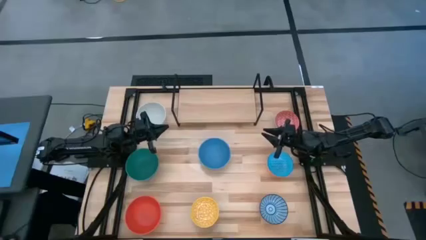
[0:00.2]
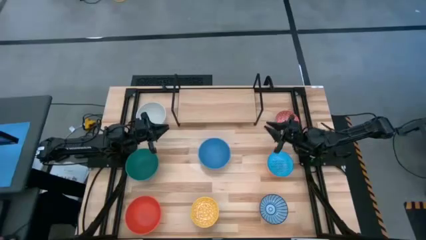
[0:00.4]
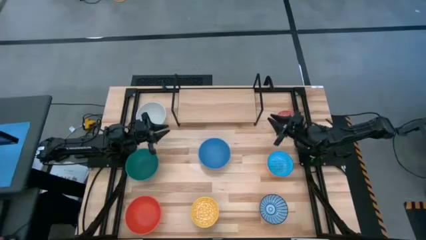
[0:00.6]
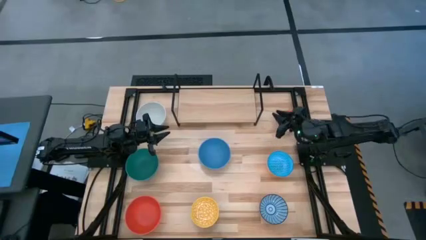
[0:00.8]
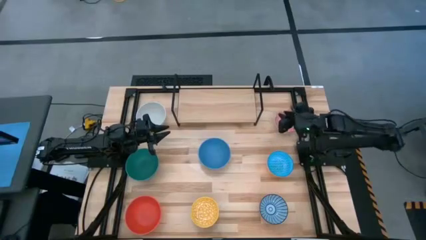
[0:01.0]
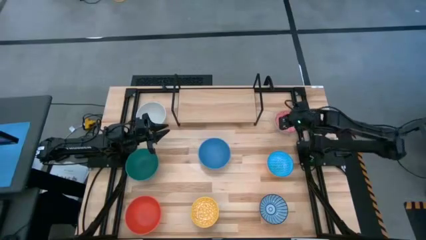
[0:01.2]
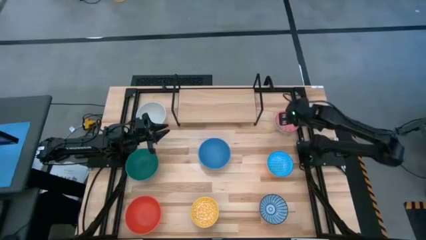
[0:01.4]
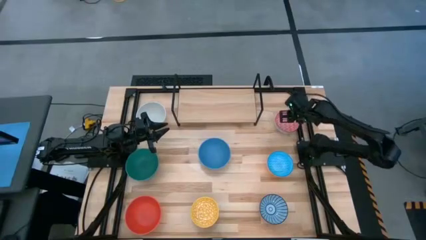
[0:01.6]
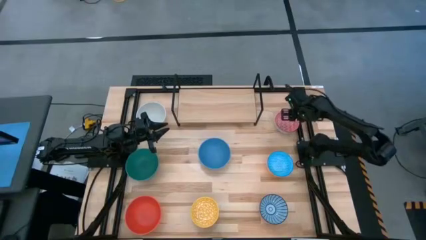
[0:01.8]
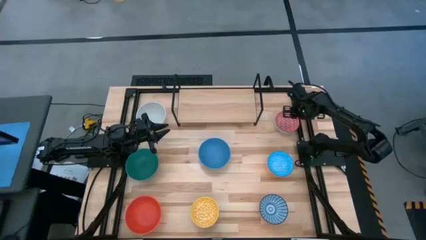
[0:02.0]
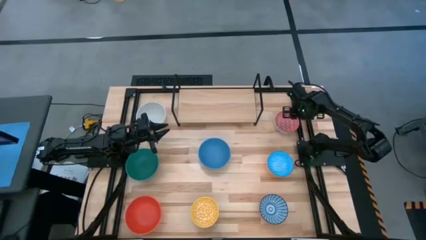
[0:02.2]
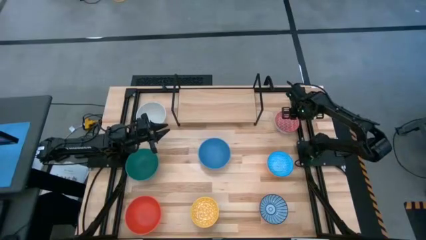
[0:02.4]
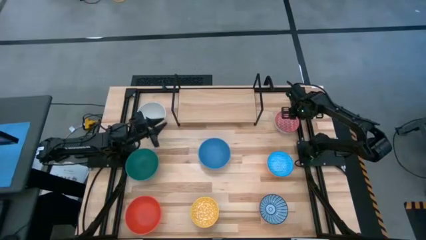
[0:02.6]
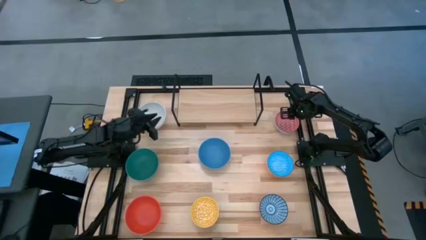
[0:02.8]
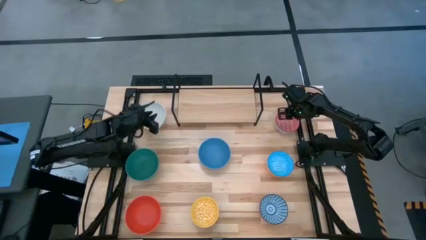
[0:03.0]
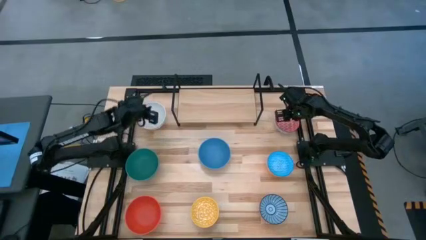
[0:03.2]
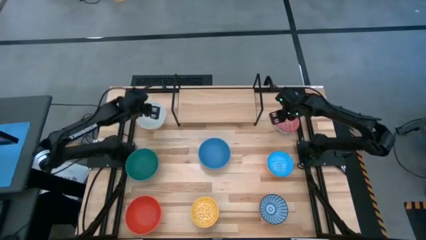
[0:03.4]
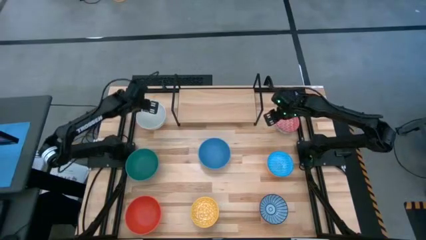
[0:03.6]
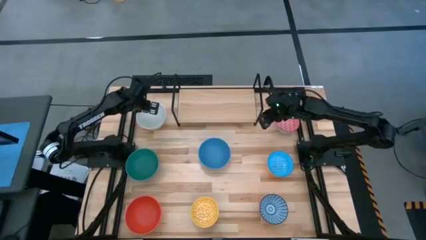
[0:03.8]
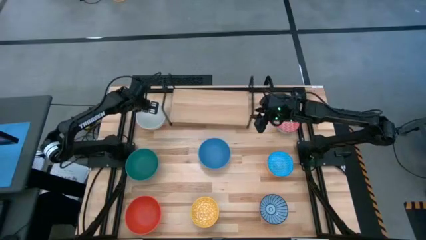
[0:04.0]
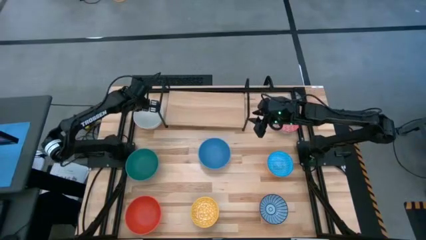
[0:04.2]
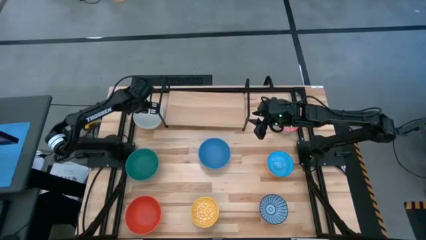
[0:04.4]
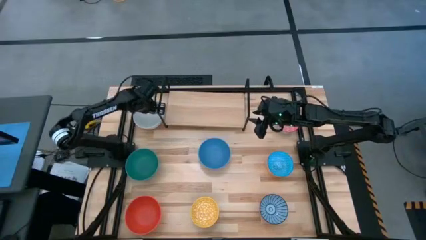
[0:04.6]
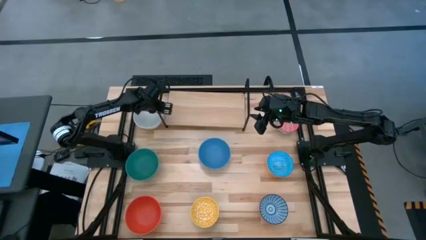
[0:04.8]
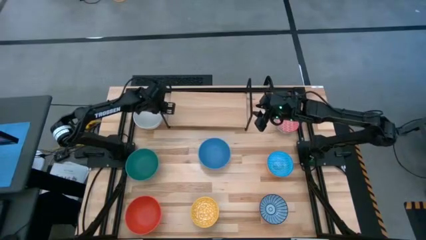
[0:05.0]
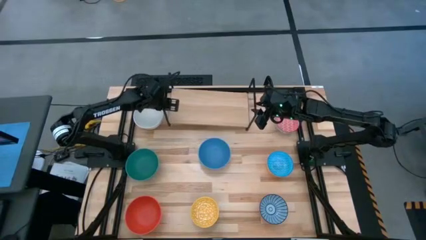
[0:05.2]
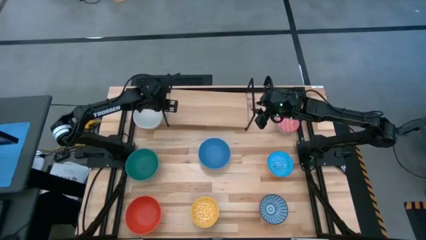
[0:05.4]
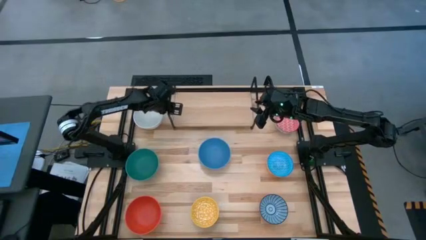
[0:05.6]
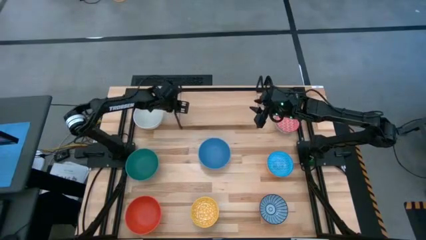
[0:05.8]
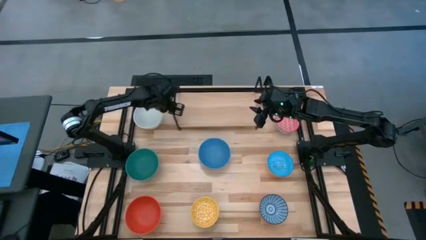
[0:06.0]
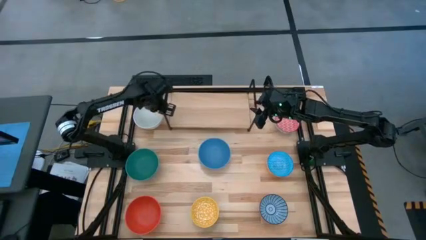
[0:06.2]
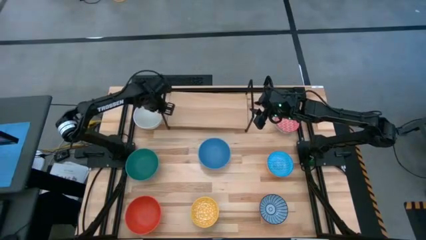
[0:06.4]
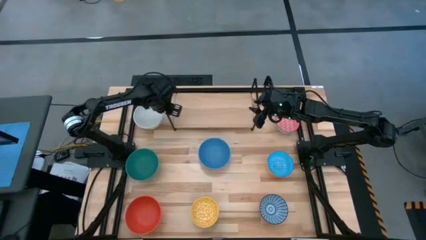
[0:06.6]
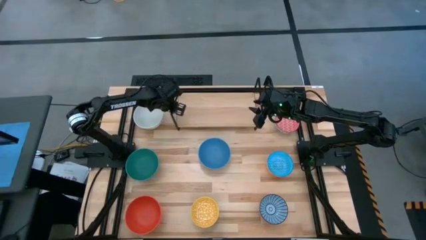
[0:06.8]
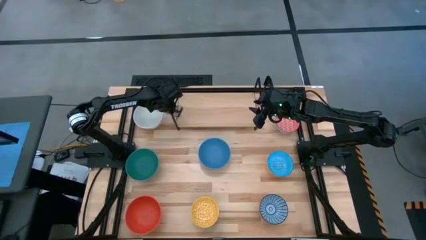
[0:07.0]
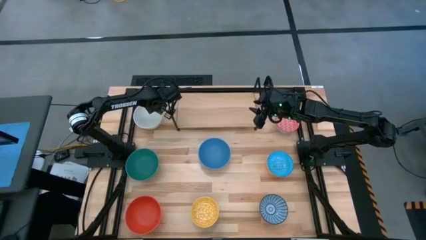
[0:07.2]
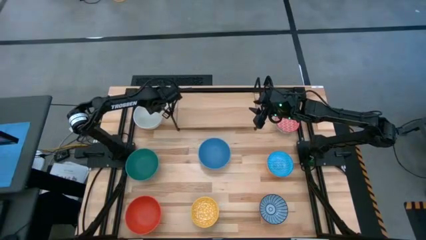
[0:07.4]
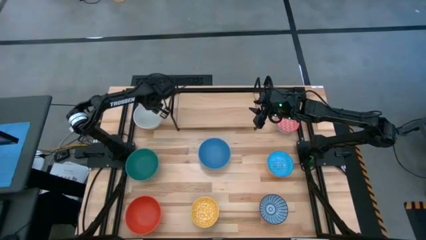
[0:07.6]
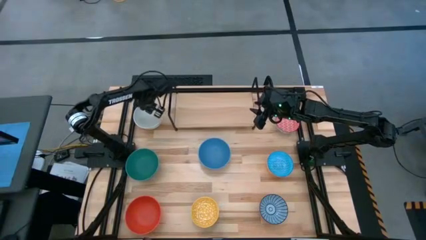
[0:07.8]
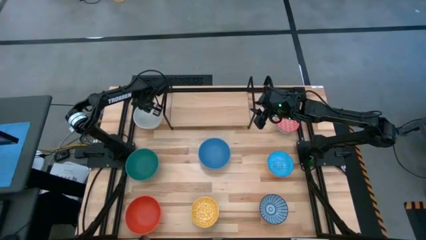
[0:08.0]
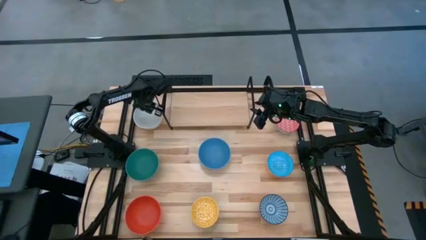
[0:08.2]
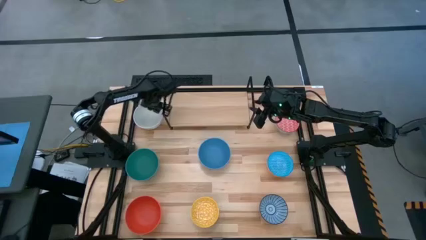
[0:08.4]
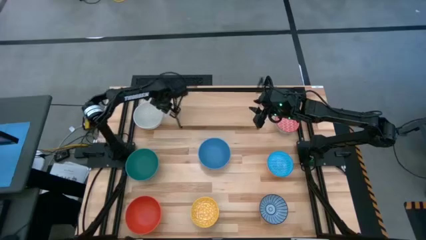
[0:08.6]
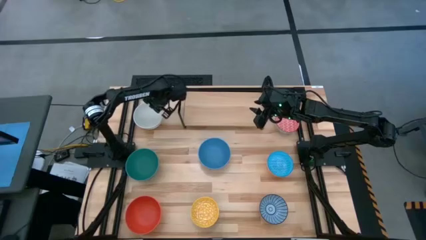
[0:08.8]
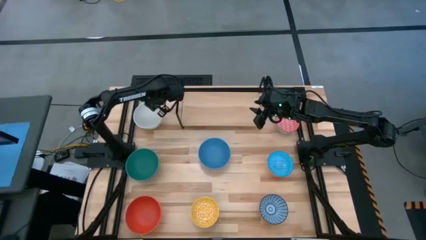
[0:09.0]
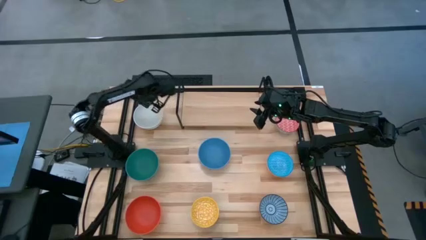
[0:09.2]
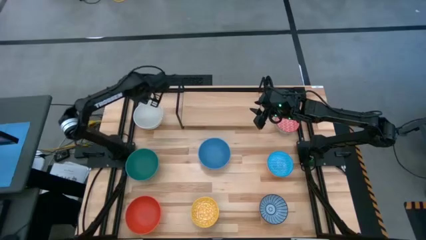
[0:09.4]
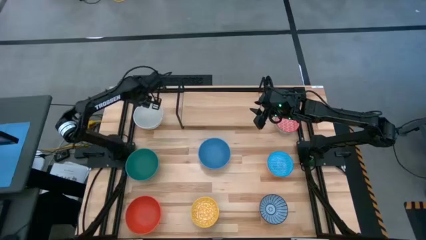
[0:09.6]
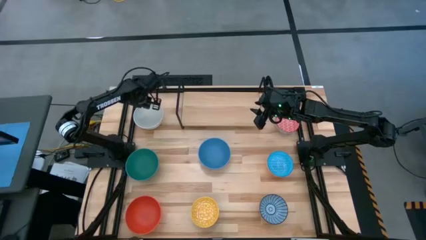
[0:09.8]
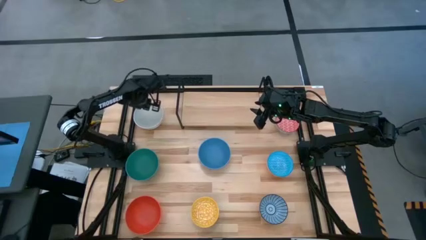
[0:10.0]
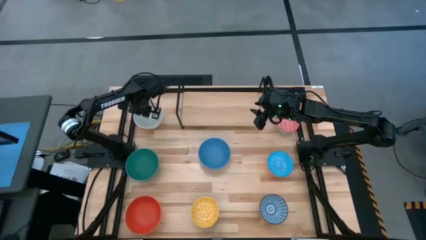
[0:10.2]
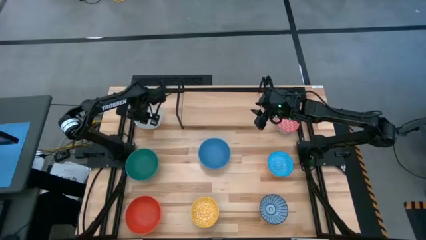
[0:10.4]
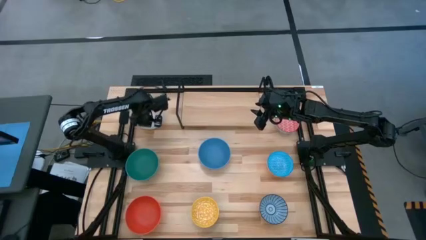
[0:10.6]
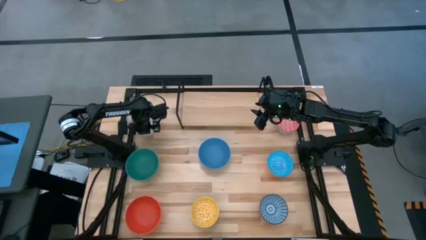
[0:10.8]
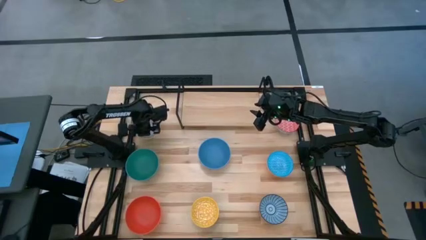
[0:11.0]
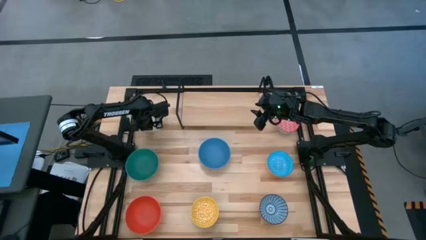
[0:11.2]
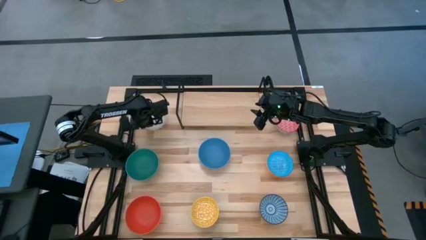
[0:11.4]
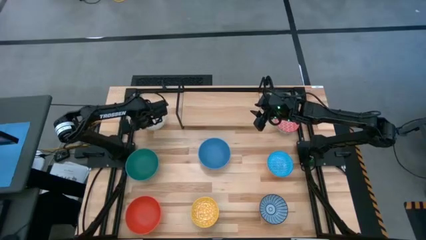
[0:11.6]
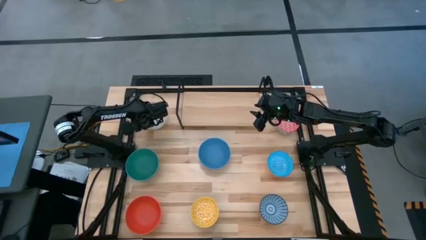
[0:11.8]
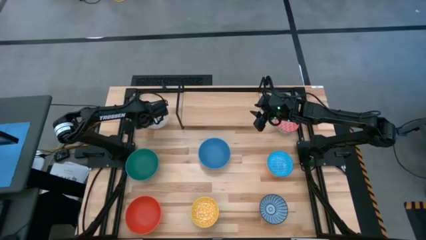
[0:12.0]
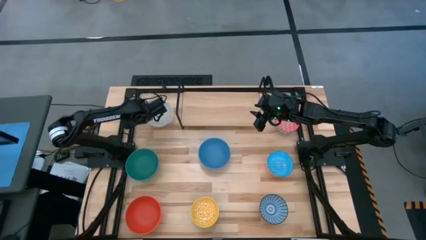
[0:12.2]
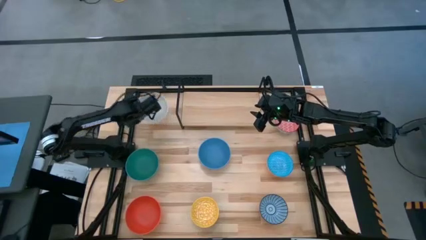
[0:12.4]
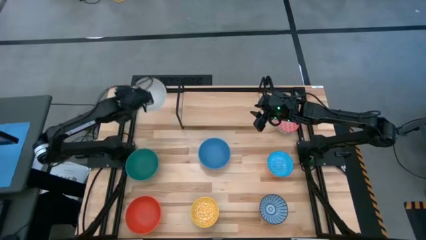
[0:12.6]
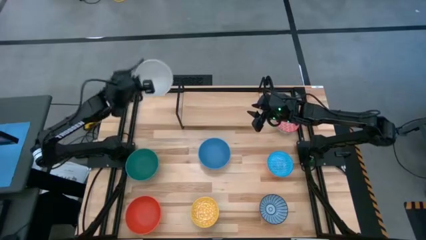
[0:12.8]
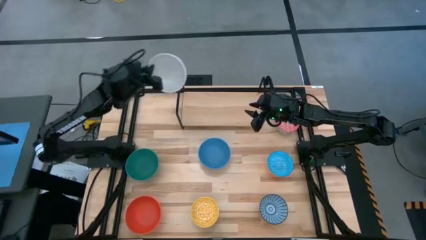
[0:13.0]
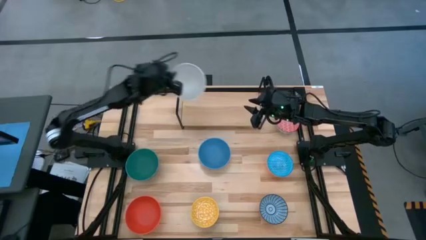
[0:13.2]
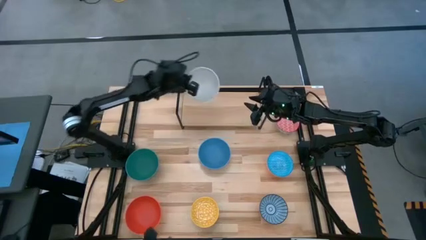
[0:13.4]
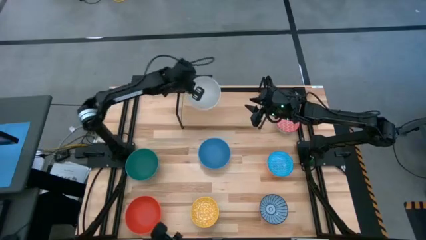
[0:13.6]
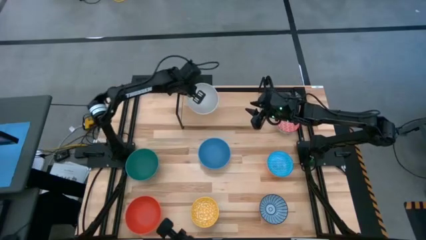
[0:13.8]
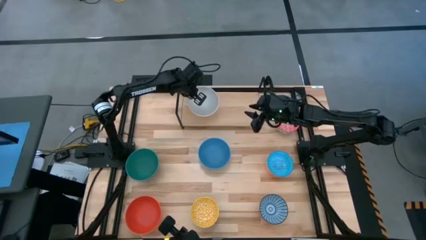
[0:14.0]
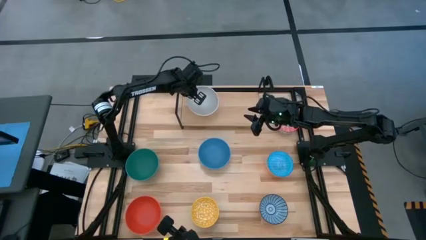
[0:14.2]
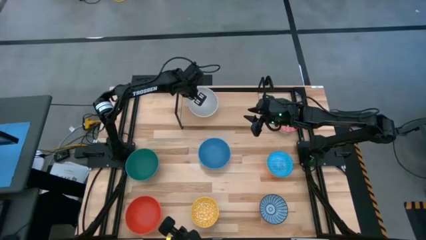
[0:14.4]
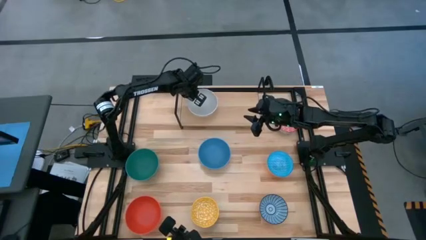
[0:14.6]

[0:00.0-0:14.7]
Task: Place and stack bowls onto a shelf
Put the white bowl on the shelf
